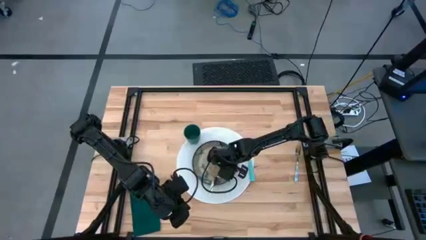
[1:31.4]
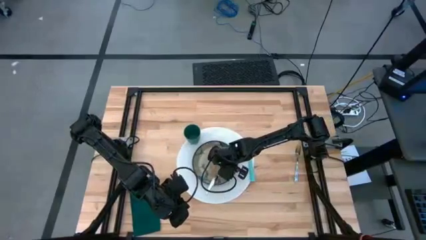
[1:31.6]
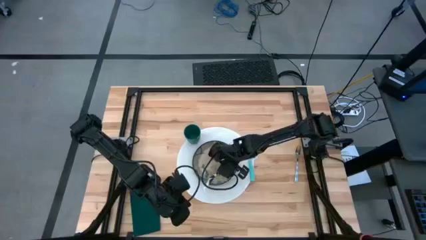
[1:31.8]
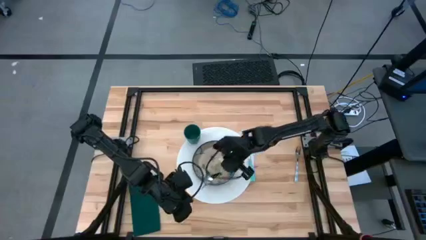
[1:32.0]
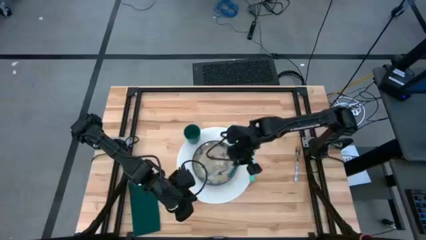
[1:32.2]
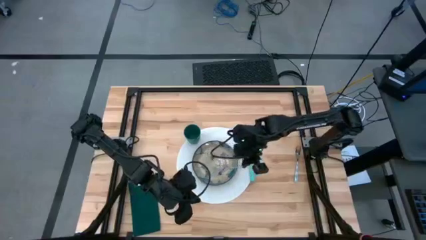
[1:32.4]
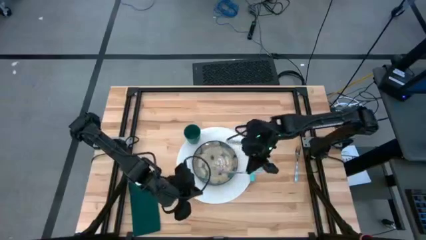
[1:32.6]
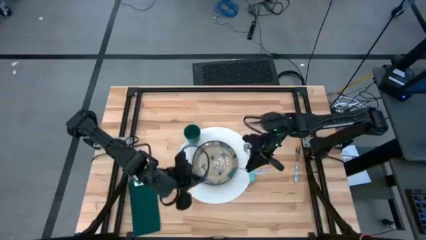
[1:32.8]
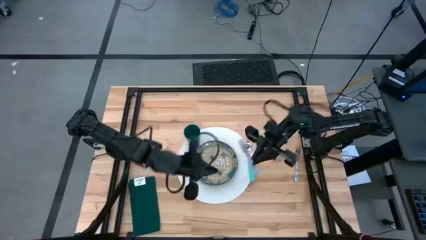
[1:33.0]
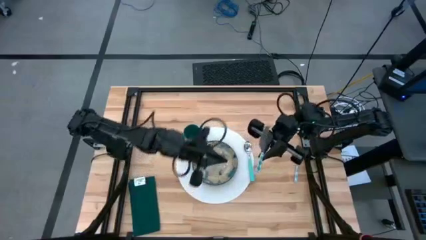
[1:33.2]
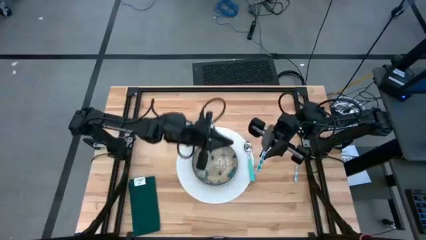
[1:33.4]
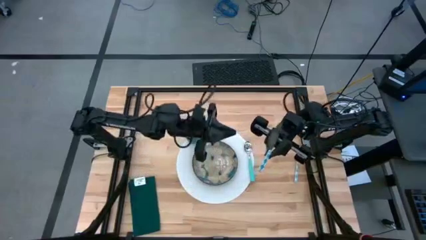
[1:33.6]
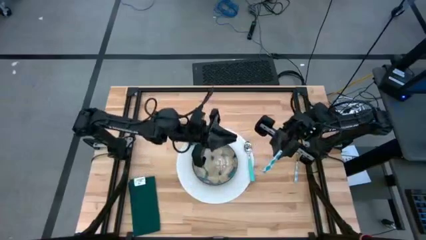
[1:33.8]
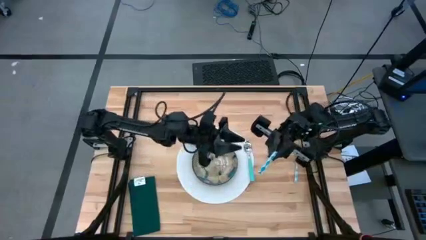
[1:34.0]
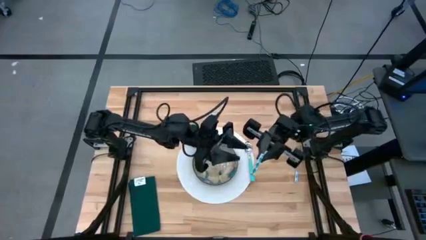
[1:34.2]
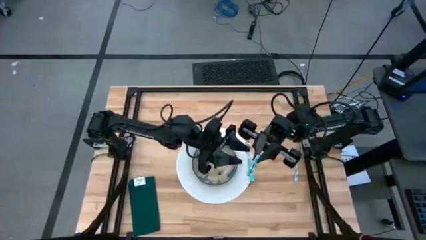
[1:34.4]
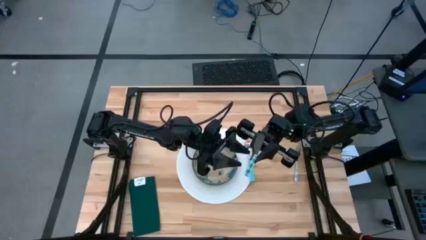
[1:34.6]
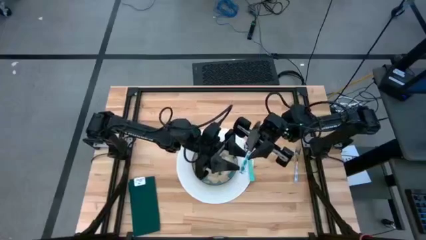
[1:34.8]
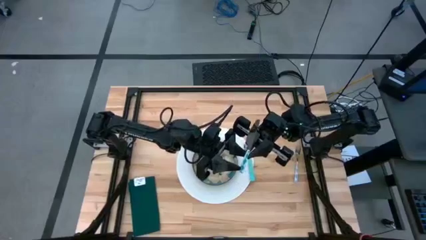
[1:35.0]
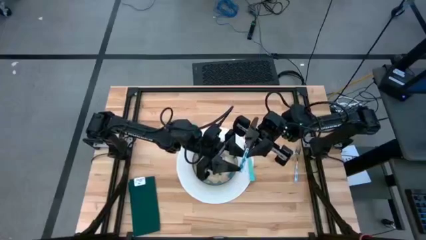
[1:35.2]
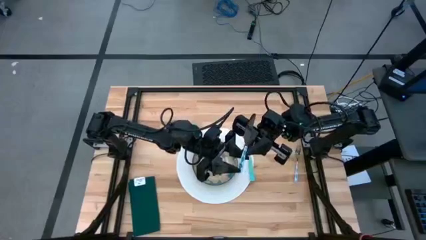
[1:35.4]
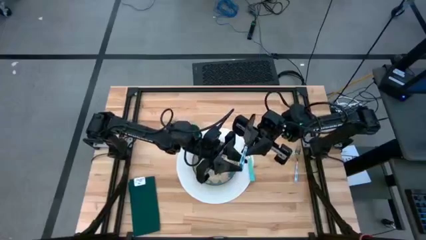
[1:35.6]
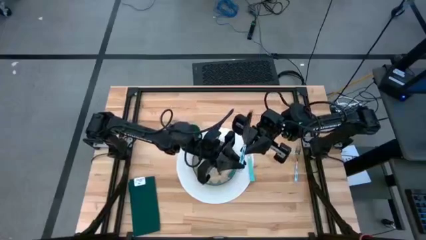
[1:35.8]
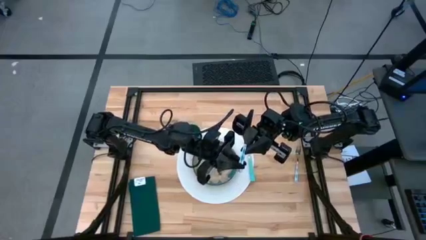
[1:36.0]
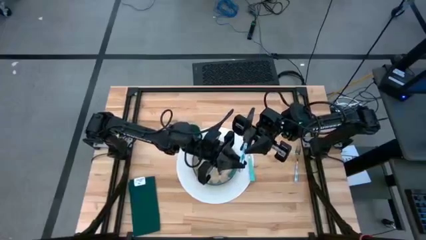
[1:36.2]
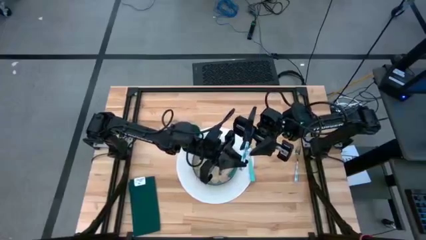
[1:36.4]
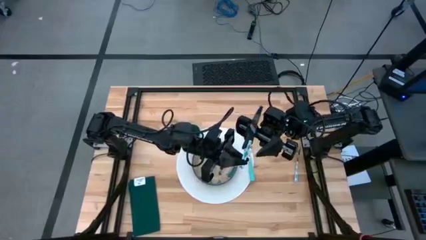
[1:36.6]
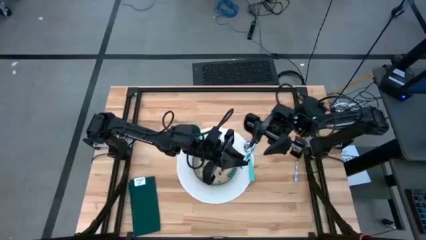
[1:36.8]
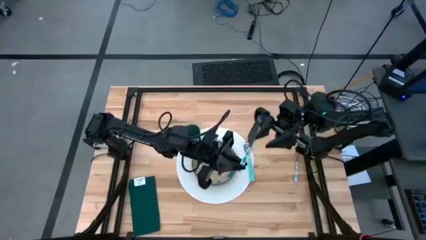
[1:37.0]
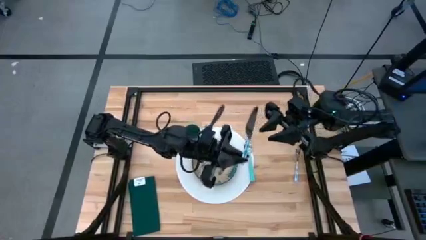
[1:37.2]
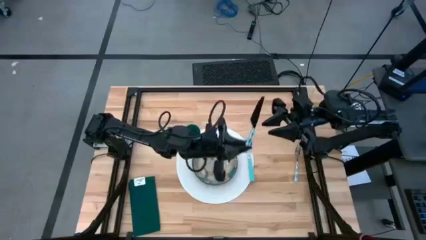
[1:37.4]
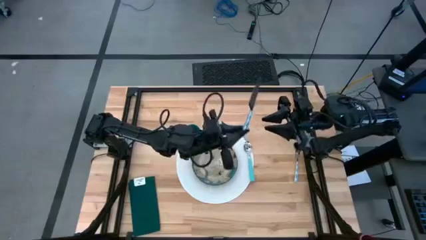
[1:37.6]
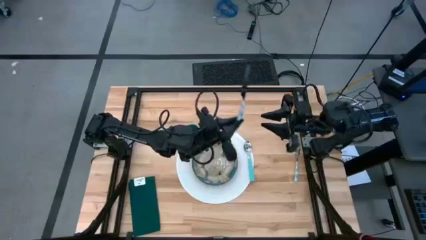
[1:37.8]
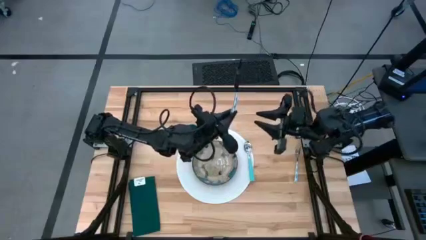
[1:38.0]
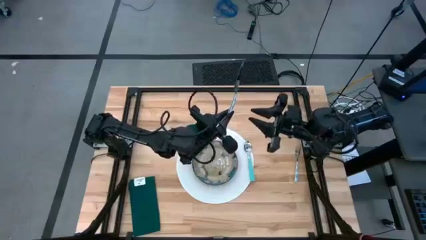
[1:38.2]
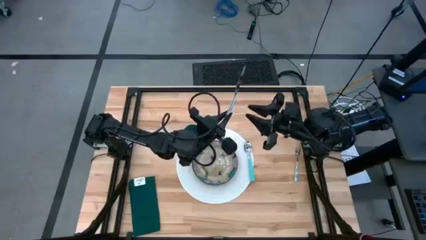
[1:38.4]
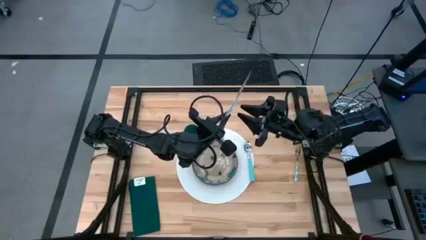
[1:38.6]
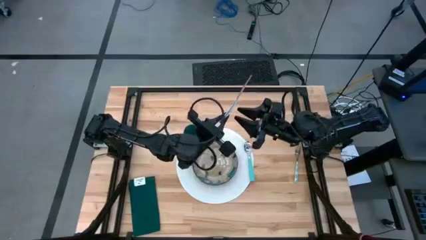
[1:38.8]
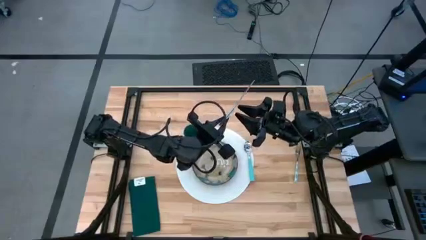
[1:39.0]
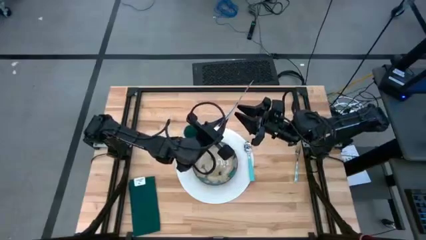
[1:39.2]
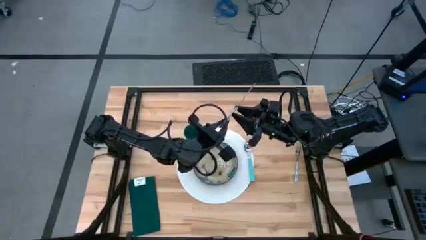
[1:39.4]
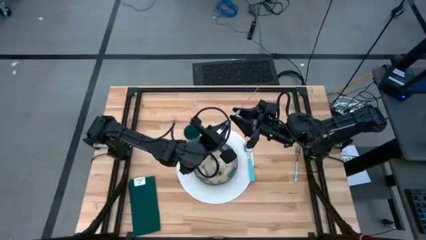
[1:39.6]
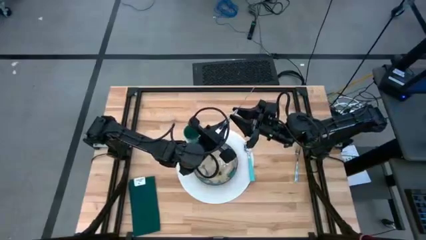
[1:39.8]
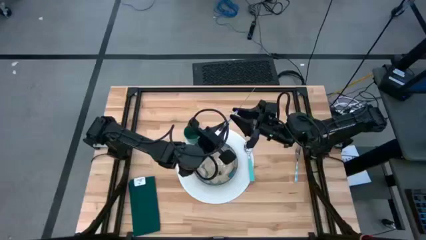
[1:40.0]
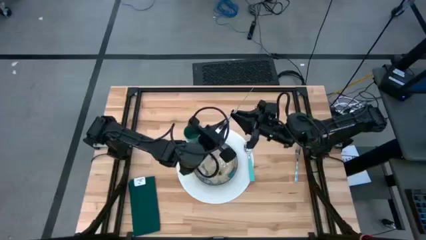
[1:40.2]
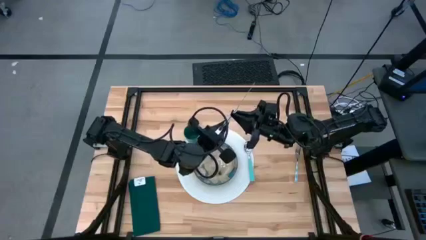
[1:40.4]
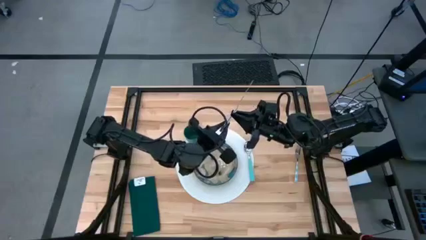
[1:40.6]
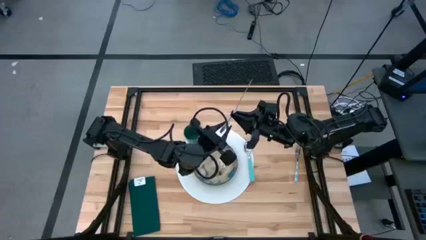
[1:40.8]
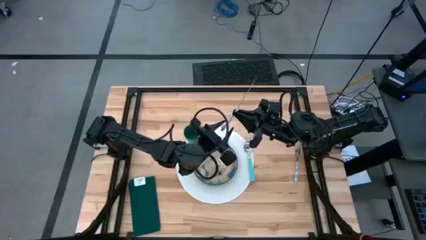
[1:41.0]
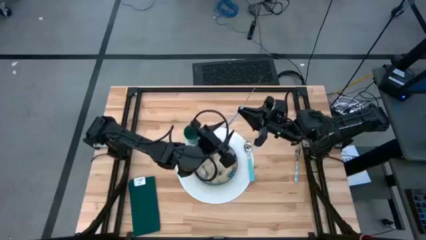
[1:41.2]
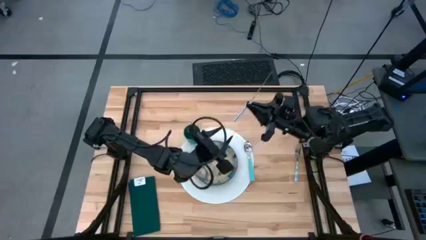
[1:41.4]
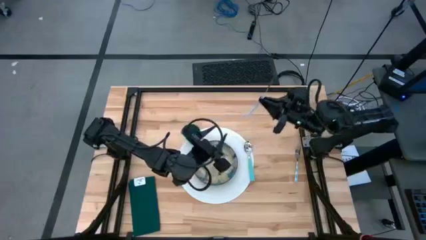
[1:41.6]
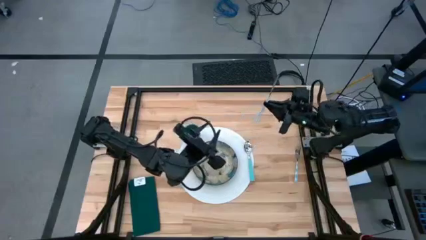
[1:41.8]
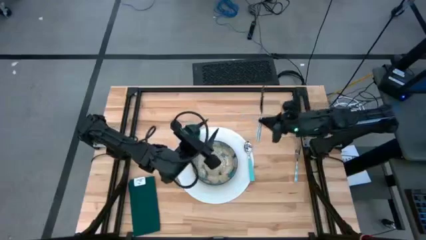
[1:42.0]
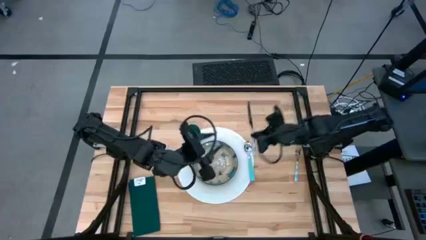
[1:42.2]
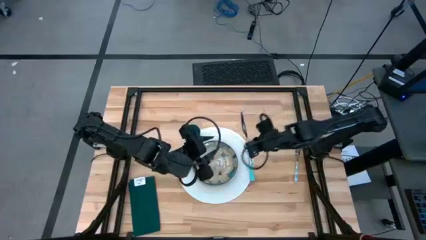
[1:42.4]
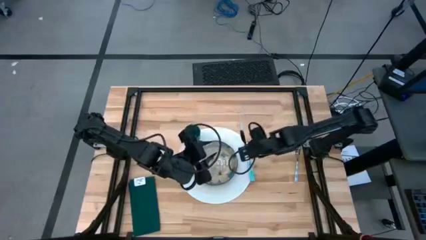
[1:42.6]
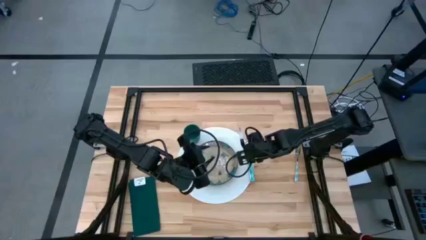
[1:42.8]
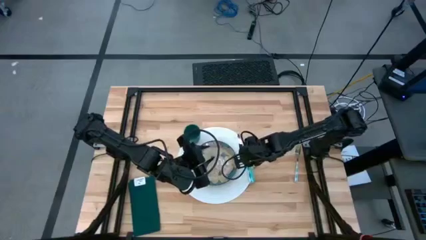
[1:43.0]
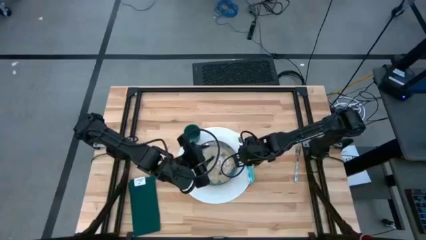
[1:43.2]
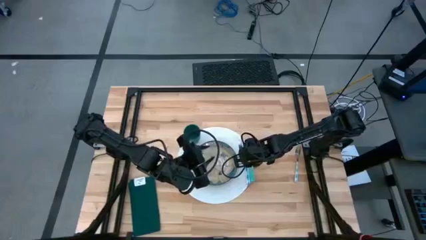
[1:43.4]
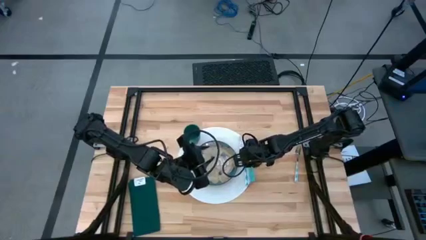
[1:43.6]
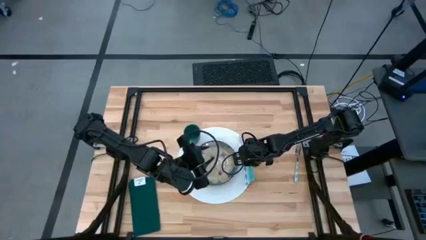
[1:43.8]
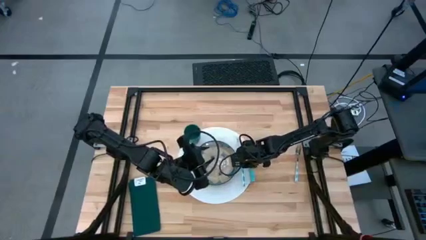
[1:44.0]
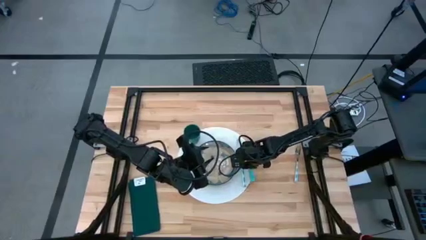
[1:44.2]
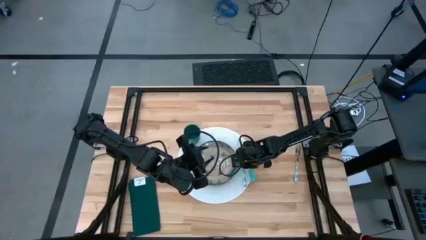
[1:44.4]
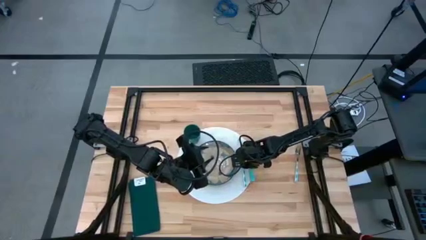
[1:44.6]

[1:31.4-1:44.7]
Task: Set table place
Put the blue knife on the right of the white table mat
